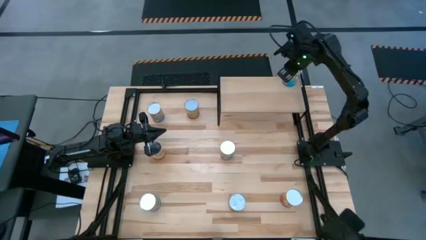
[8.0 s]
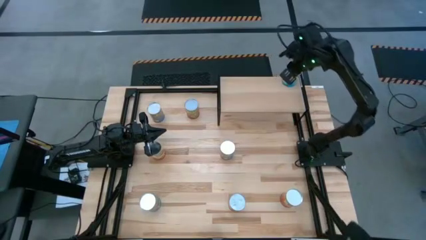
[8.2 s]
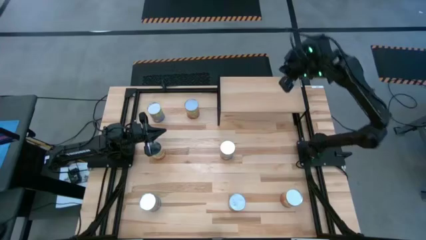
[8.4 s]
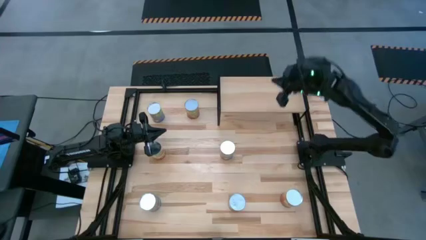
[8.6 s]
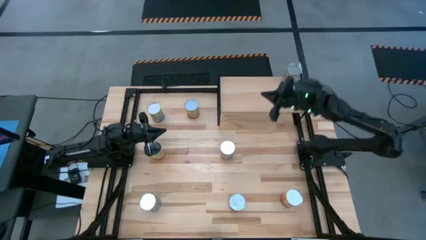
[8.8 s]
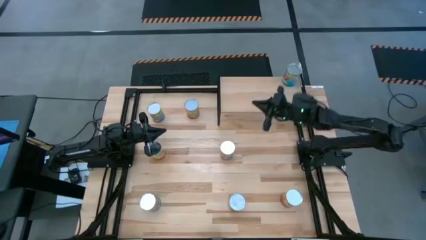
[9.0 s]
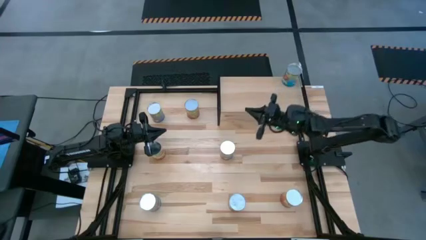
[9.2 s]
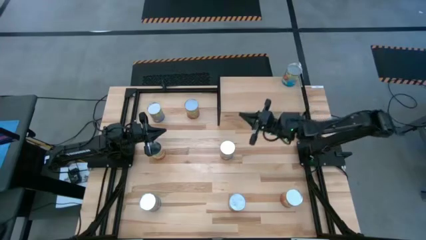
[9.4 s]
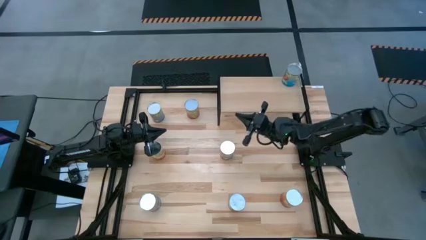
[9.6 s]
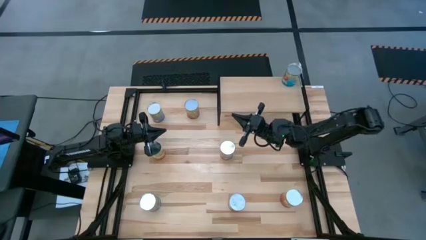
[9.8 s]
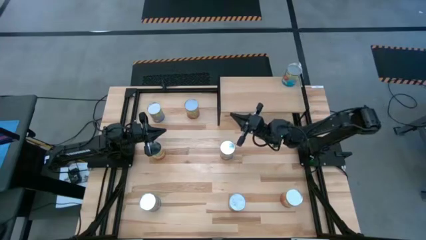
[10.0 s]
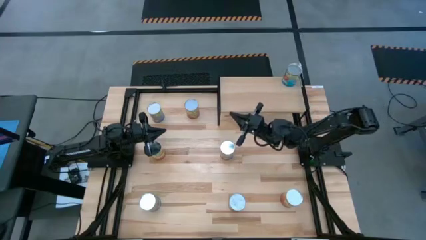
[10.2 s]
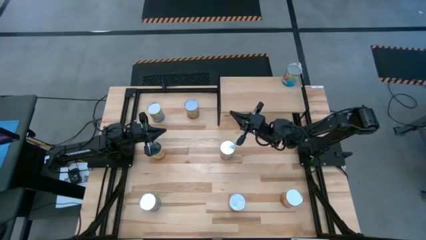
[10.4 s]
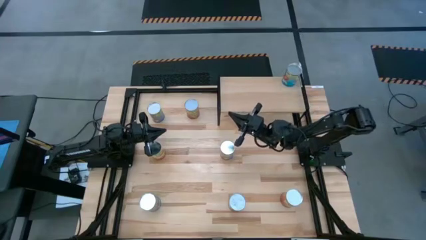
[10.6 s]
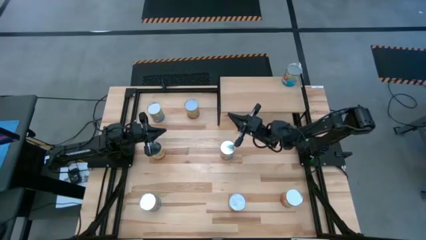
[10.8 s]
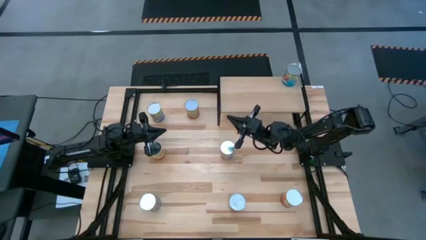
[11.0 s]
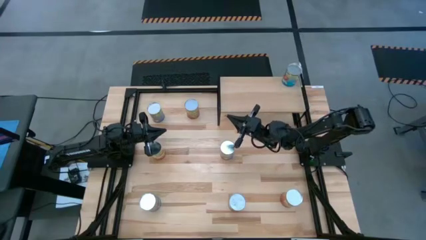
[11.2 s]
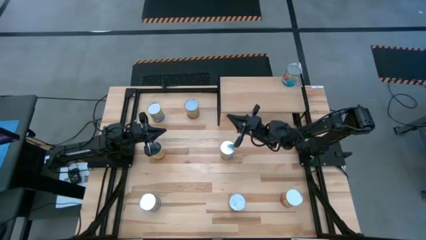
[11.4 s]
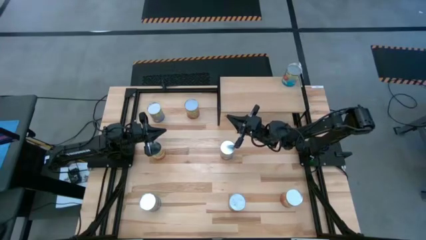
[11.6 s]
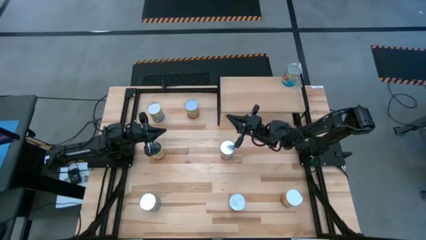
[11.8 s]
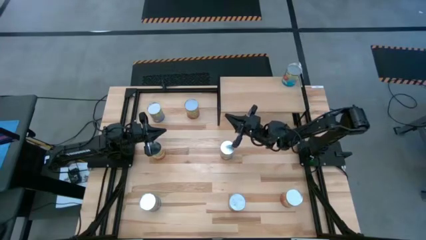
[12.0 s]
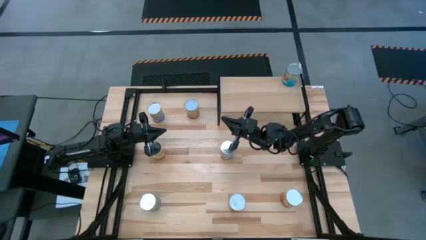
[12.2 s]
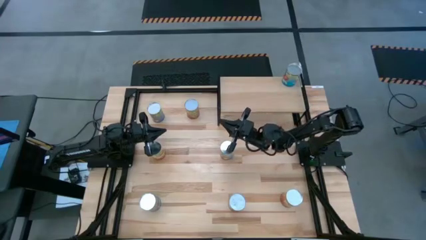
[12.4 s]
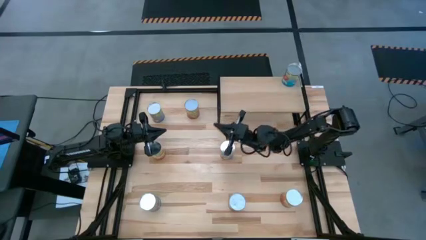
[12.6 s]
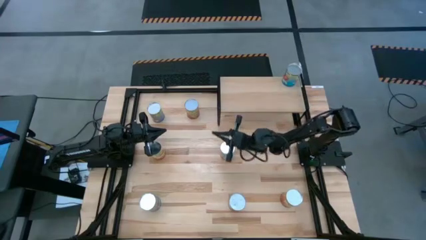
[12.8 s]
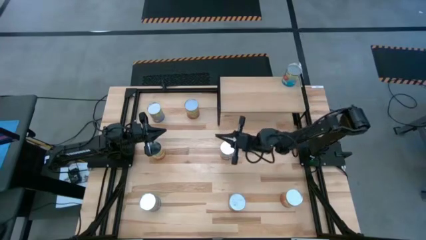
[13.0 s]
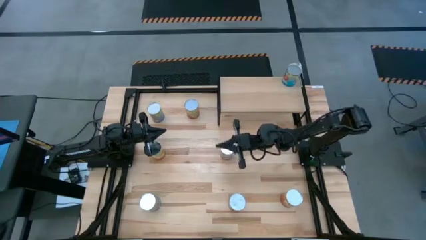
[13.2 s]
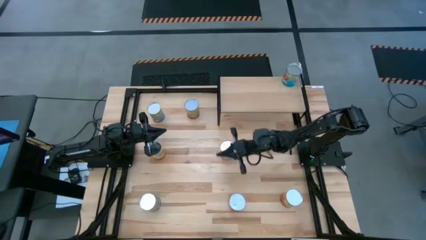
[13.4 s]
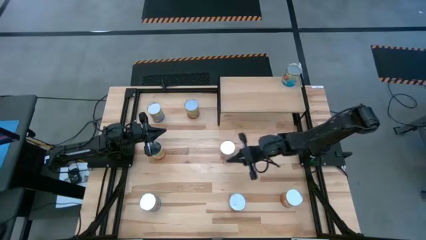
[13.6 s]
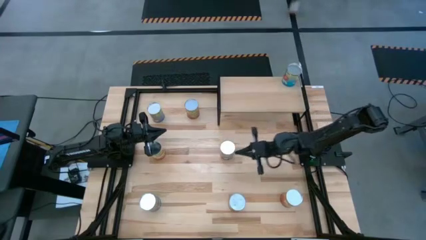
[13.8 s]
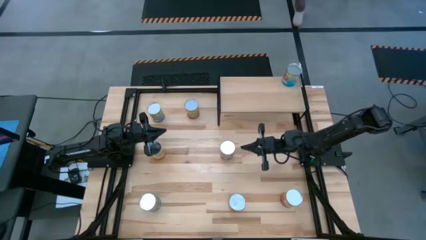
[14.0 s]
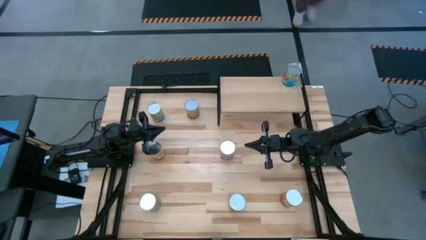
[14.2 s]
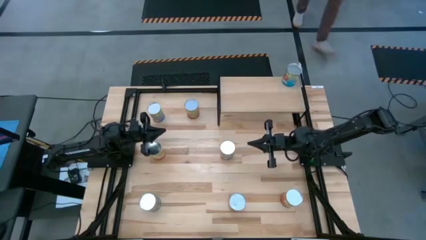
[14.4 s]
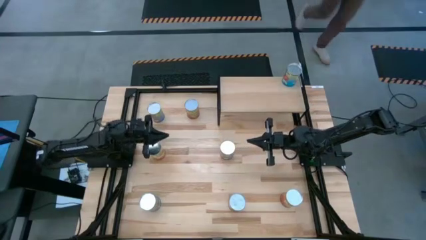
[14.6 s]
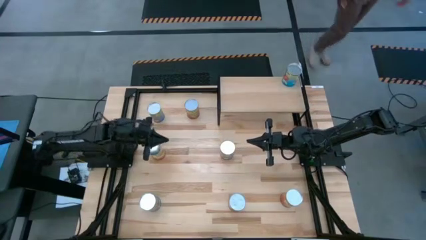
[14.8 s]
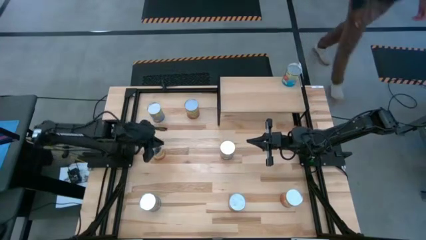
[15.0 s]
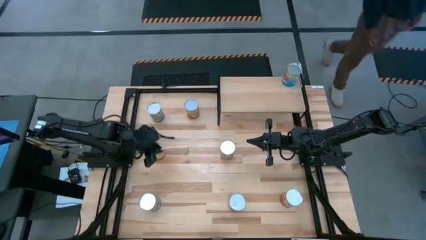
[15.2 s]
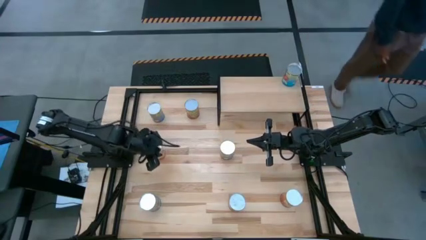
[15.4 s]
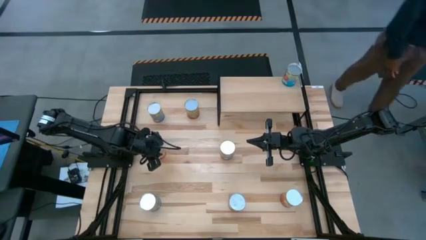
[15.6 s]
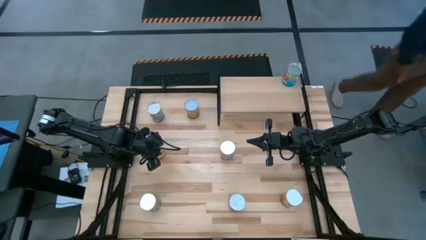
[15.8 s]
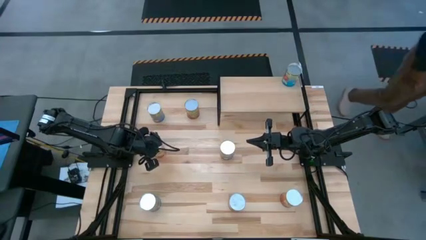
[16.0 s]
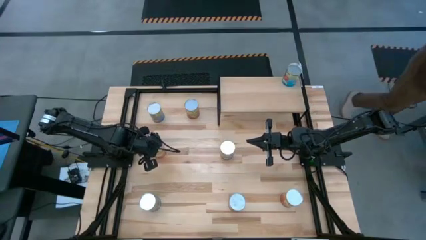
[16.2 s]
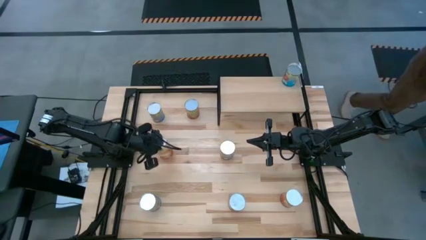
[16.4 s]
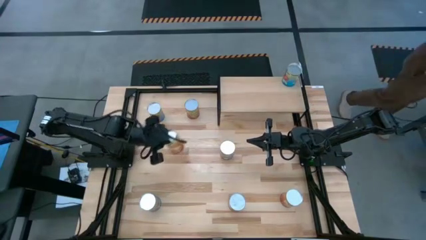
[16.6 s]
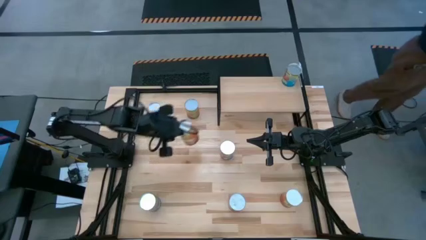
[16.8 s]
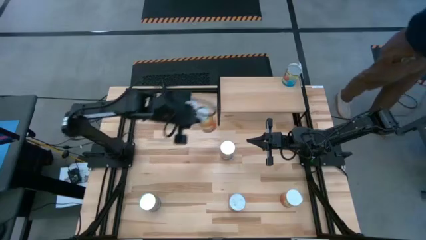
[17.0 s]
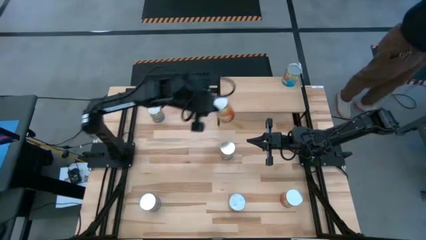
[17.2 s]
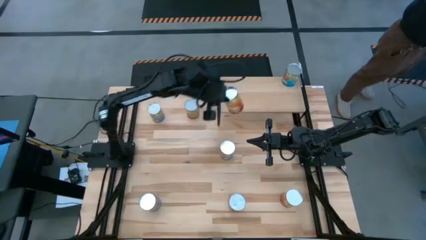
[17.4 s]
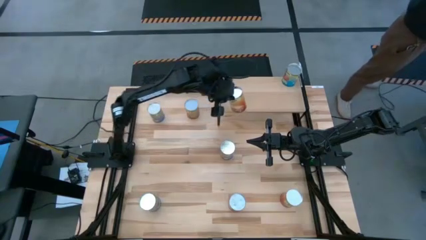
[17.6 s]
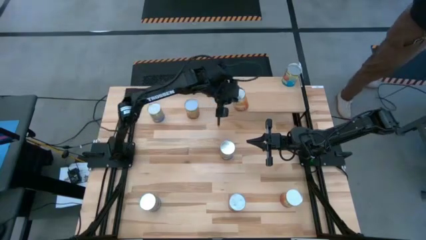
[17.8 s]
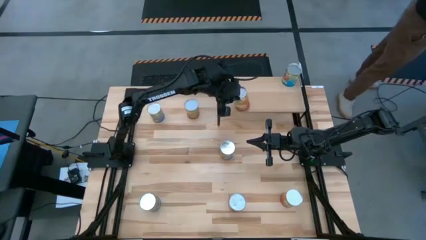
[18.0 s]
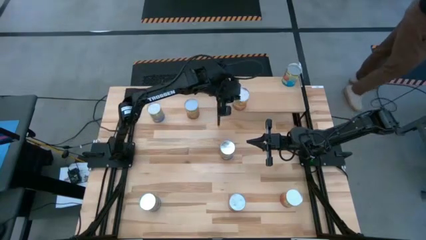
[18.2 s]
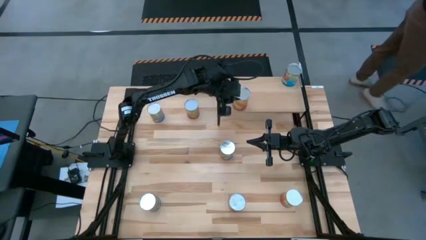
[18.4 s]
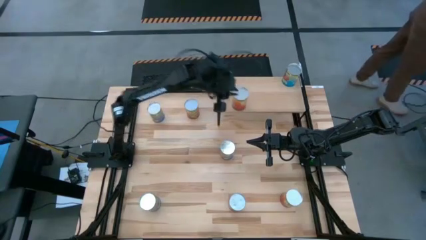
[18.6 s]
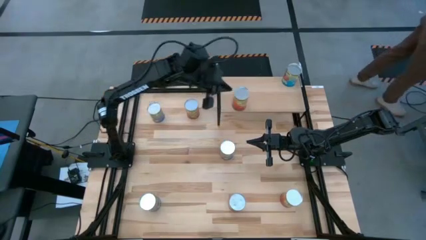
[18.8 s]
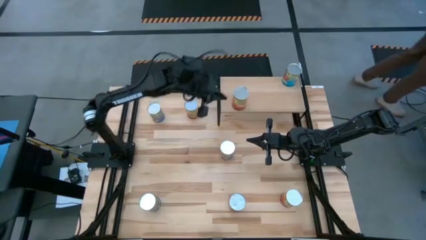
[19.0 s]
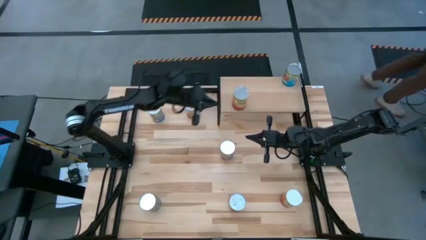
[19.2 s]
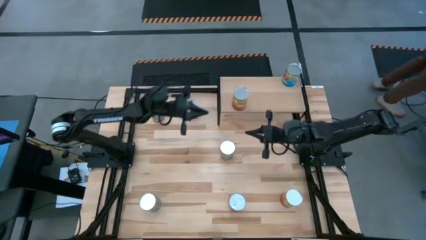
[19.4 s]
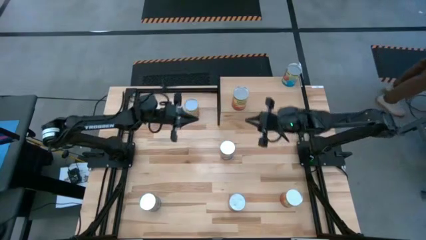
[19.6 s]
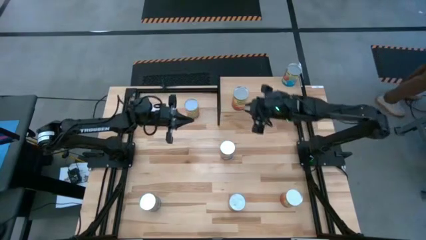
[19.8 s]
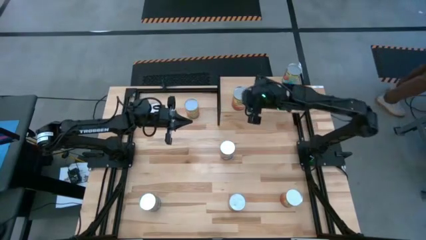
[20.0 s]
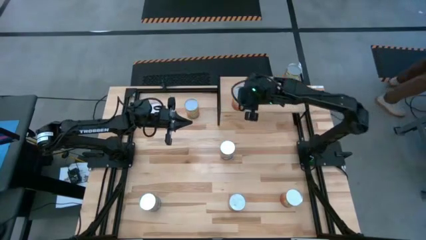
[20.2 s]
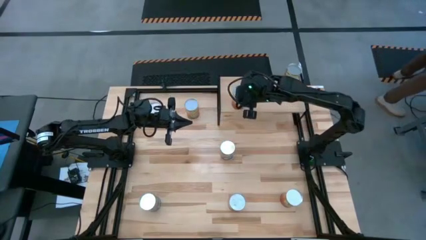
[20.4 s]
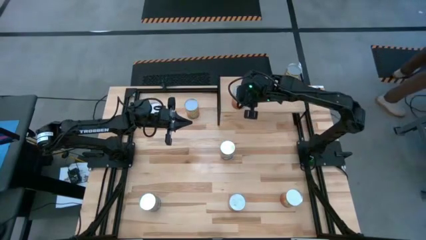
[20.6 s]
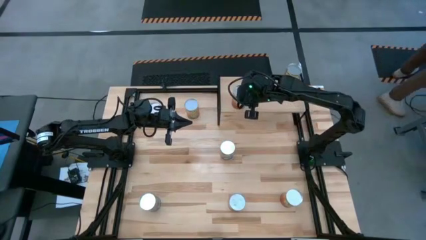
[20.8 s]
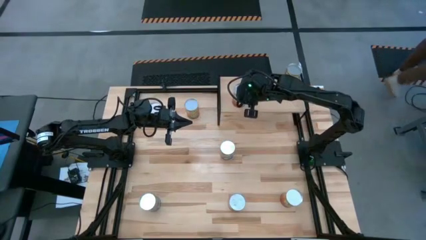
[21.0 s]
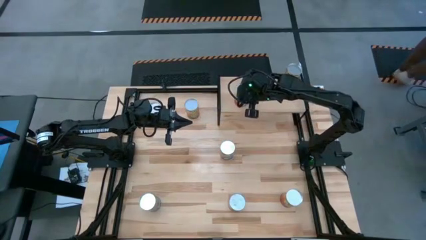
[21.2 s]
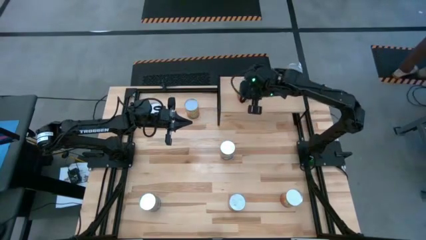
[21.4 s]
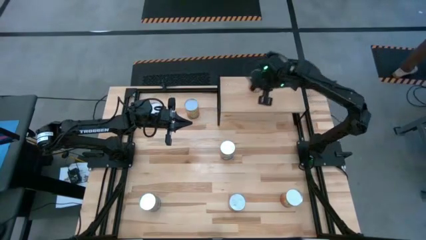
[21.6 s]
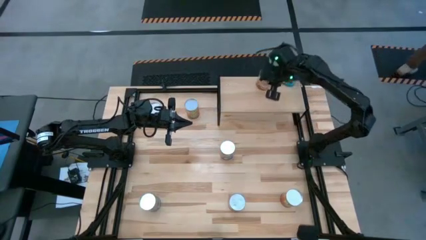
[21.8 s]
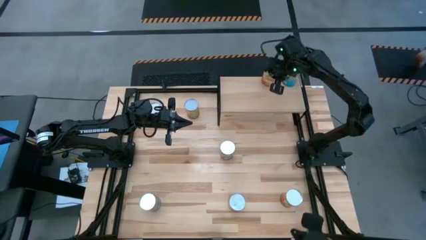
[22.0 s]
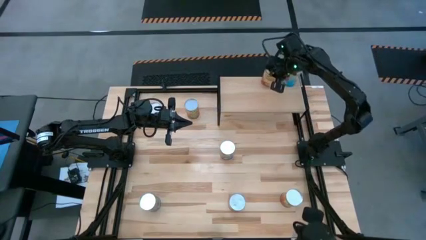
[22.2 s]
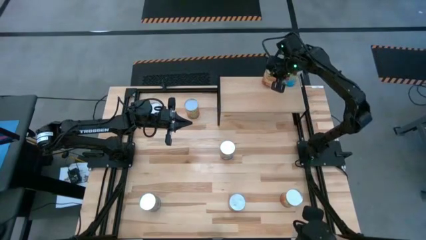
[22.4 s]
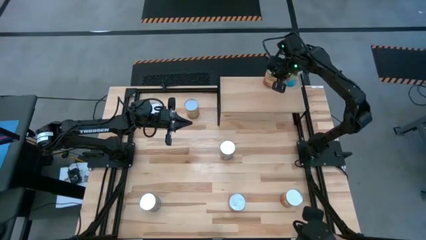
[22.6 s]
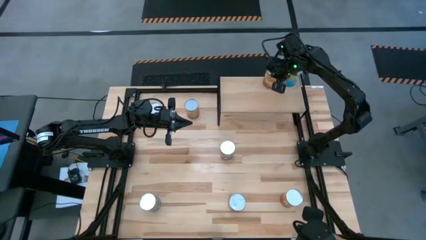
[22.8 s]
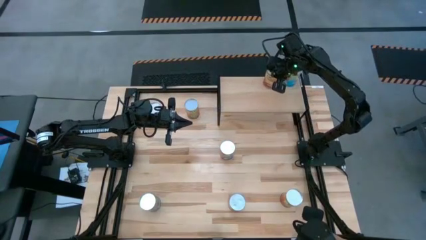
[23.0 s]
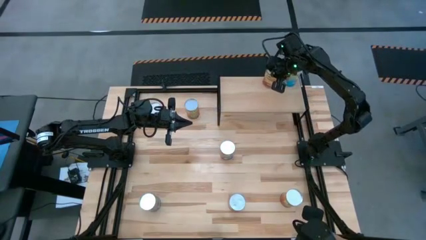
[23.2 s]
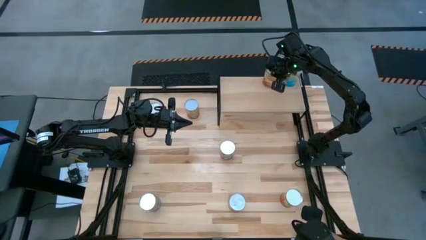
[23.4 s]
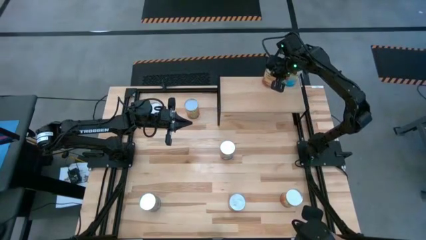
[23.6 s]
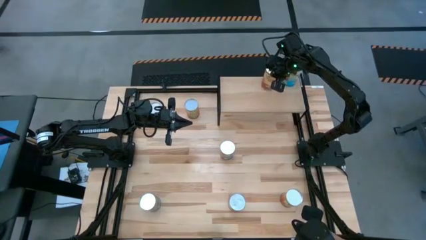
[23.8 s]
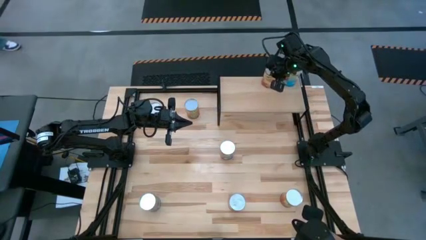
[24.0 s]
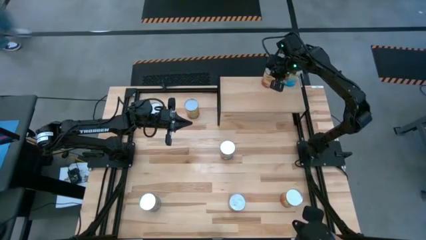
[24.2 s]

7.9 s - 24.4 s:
Task: Pick and place cans onto a shelf
Put the top canned corn on the shelf
